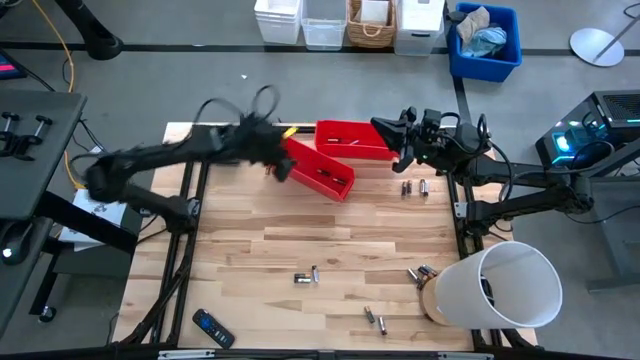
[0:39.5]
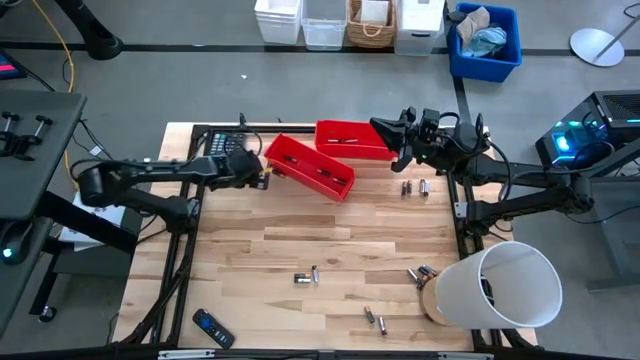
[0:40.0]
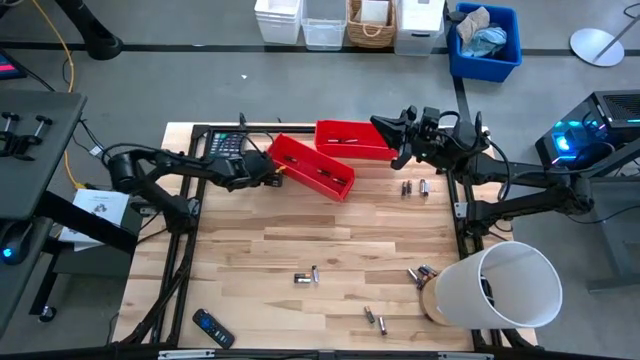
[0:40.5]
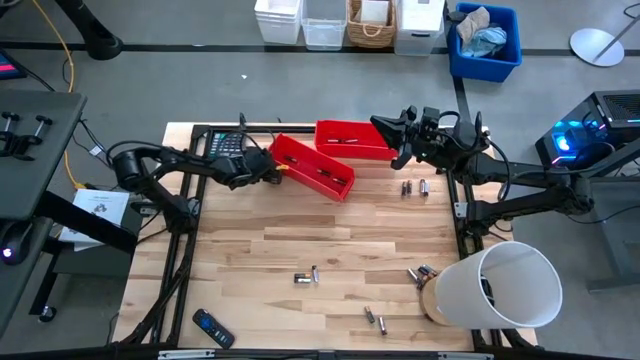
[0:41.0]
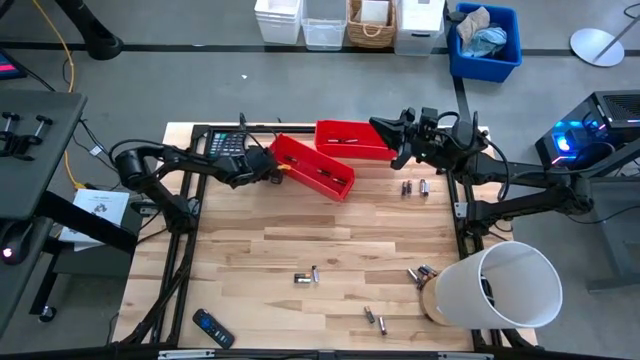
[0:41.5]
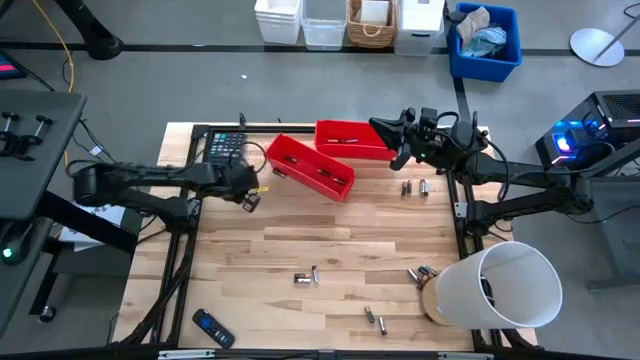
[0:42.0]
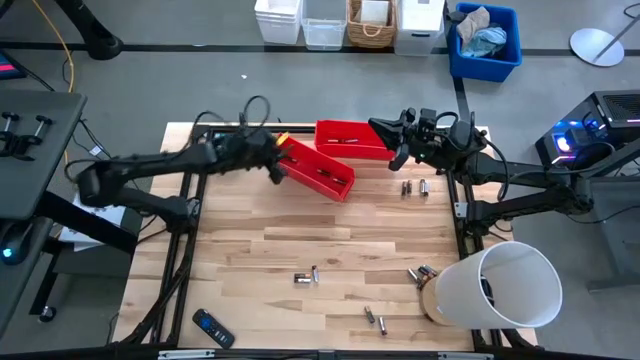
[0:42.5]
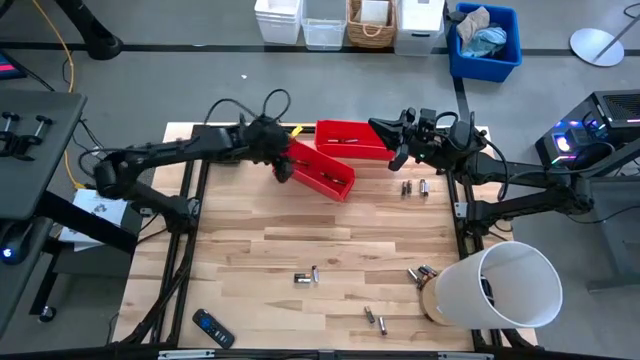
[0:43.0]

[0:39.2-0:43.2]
Task: Sort batteries
Put the black battery into the bottom red bin

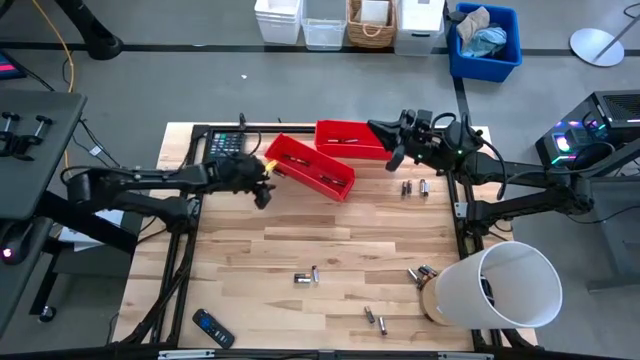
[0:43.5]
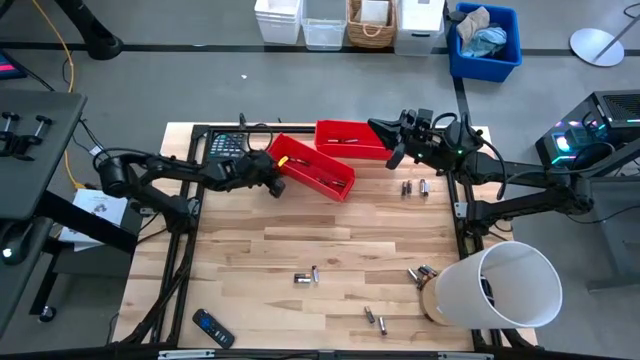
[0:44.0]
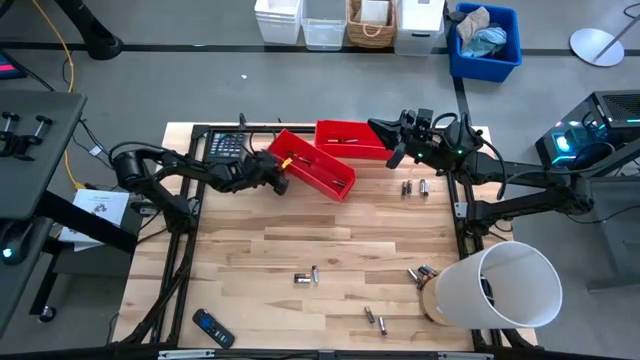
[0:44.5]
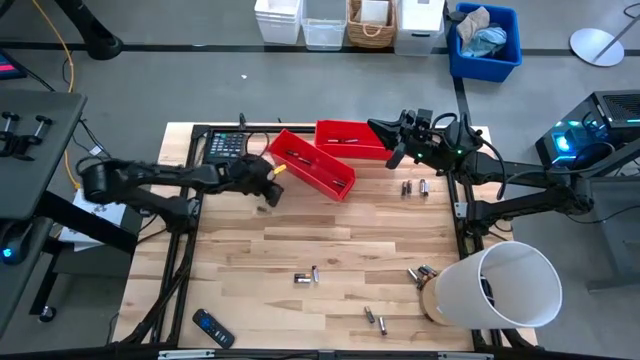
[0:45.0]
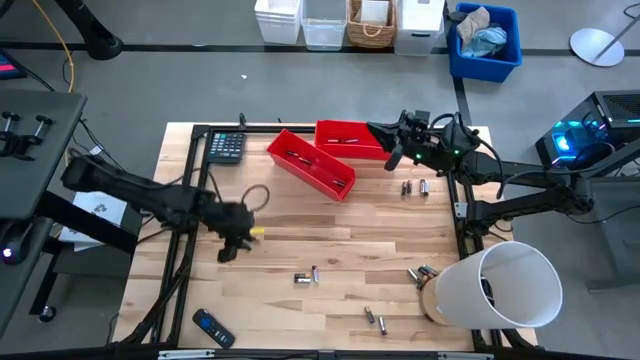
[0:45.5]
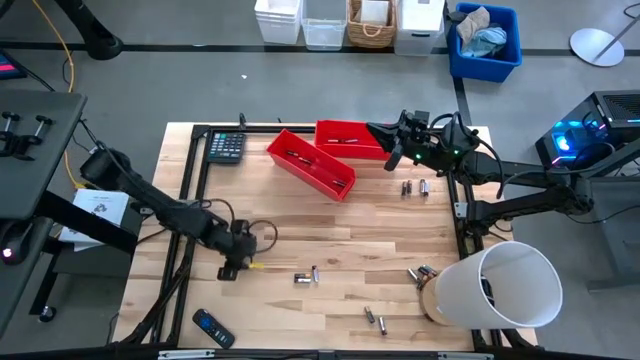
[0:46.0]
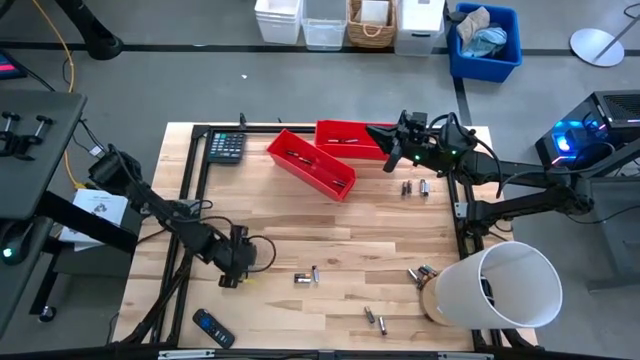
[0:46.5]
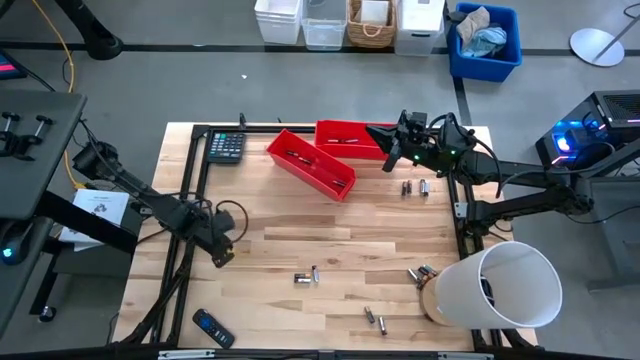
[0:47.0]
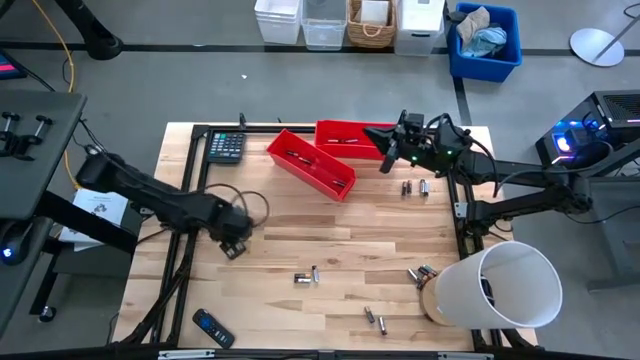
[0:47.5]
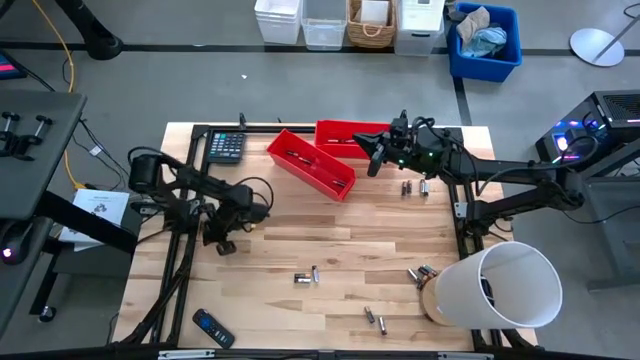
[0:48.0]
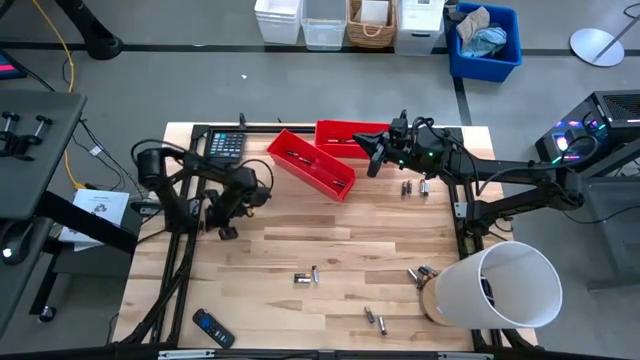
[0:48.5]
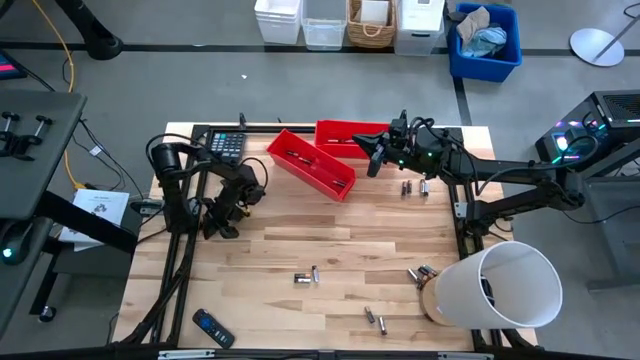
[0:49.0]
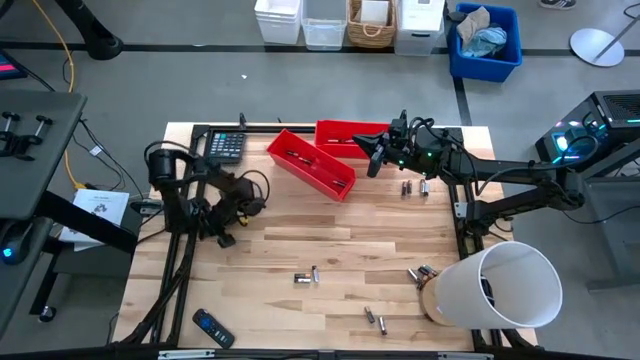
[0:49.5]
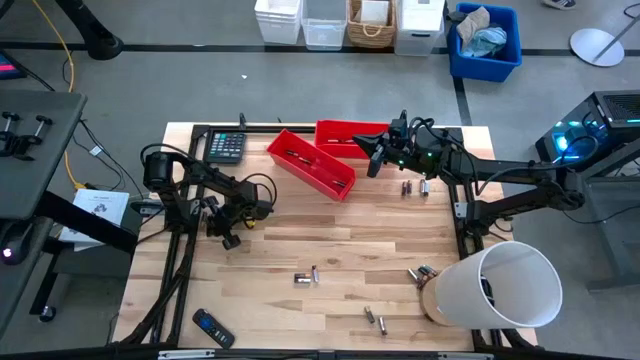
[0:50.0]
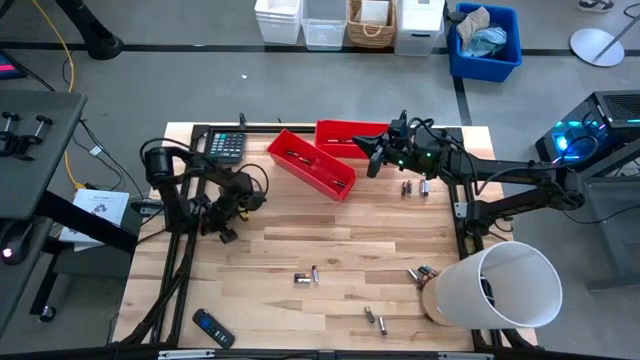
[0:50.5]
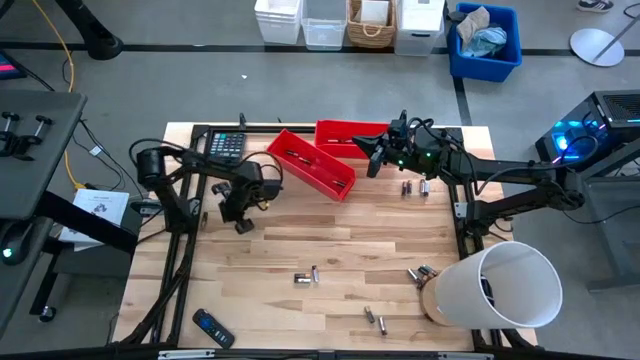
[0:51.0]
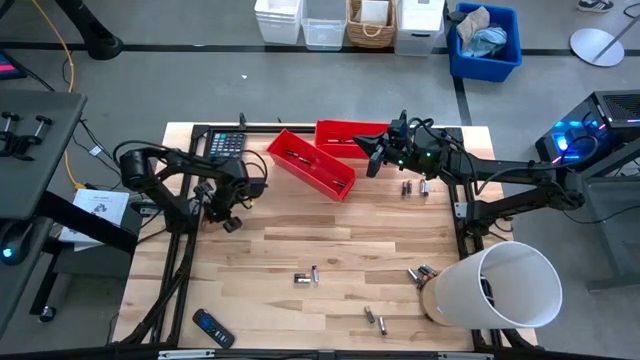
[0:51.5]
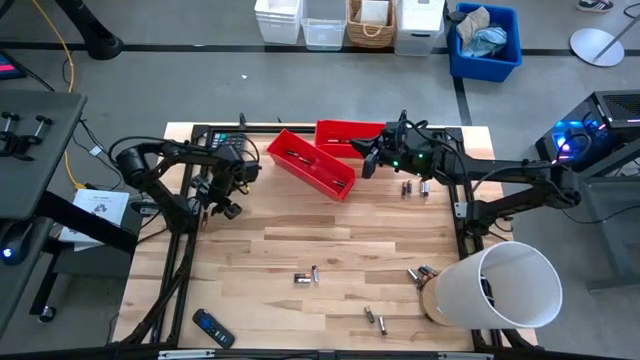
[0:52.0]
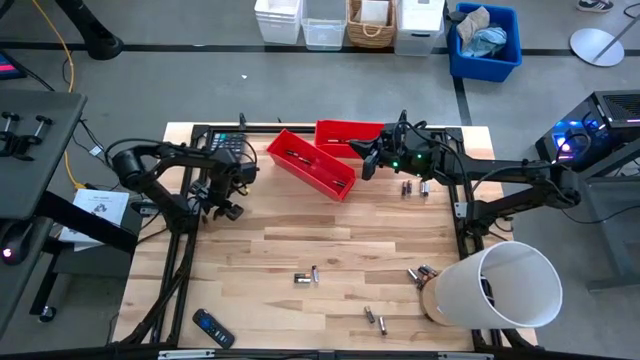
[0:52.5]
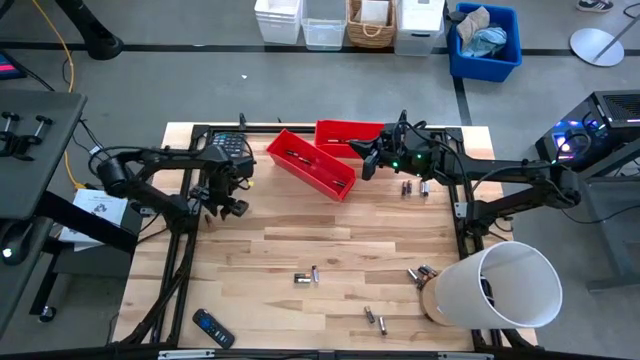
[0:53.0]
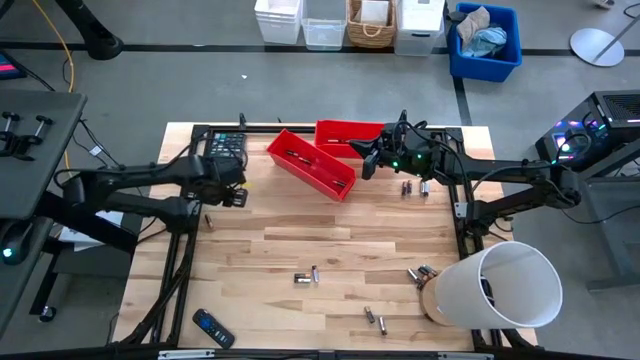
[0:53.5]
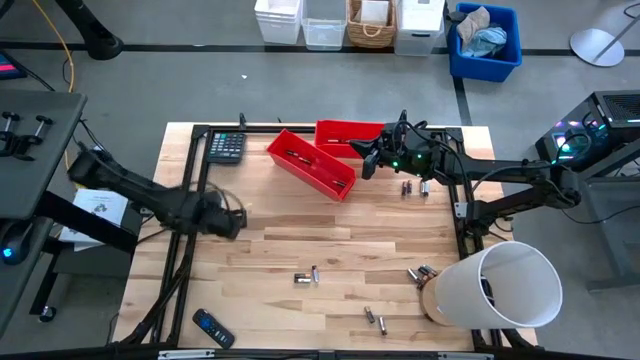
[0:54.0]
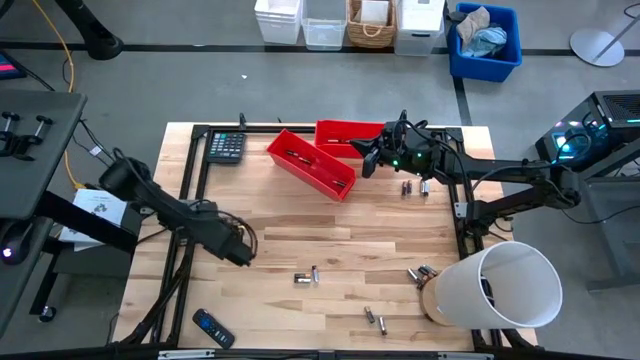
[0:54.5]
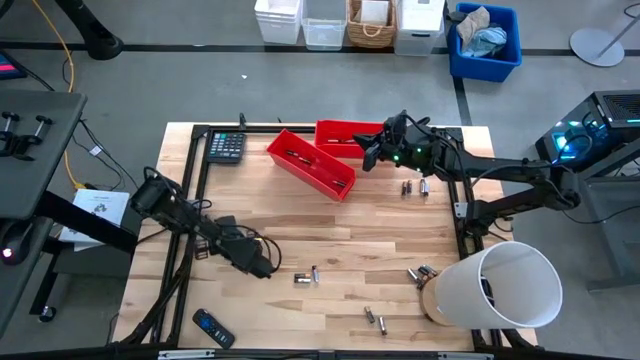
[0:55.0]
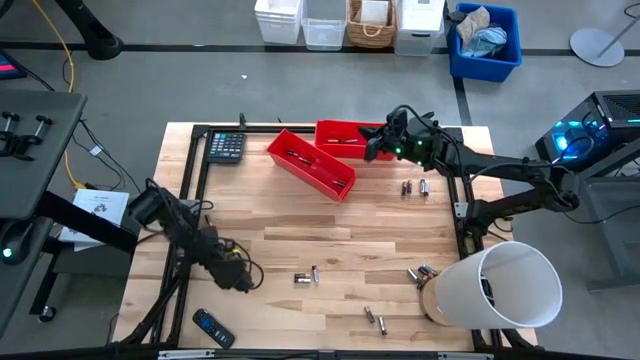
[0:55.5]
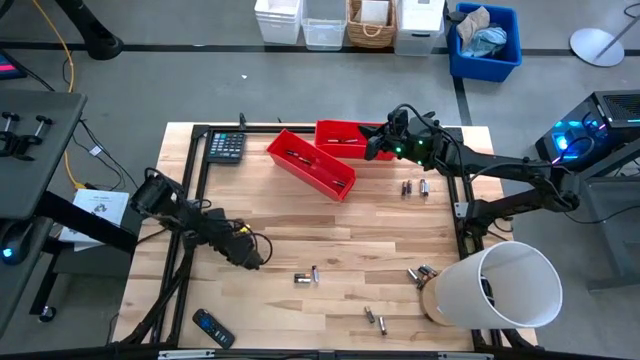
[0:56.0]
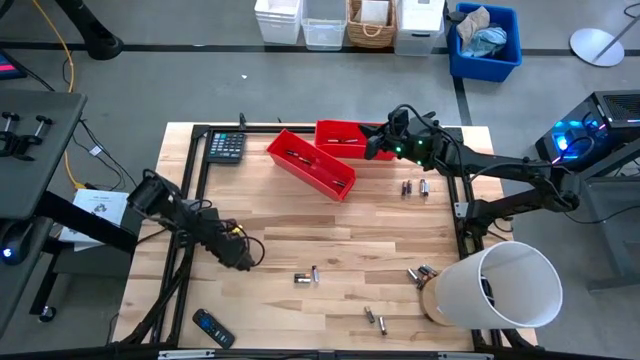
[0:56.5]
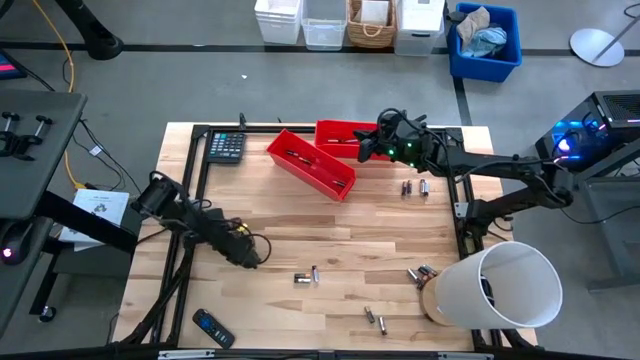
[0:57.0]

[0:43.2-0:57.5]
Put the black battery into the bottom red bin

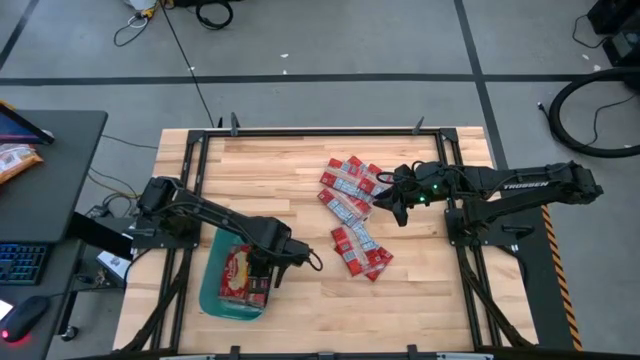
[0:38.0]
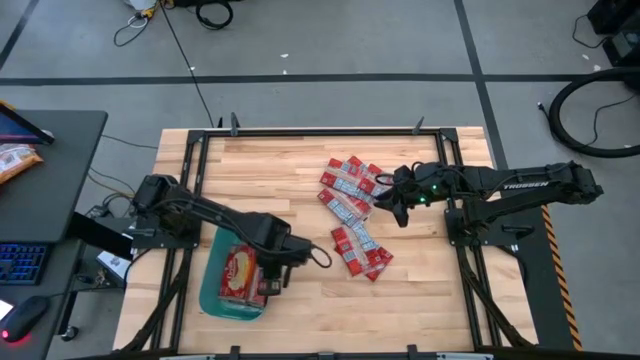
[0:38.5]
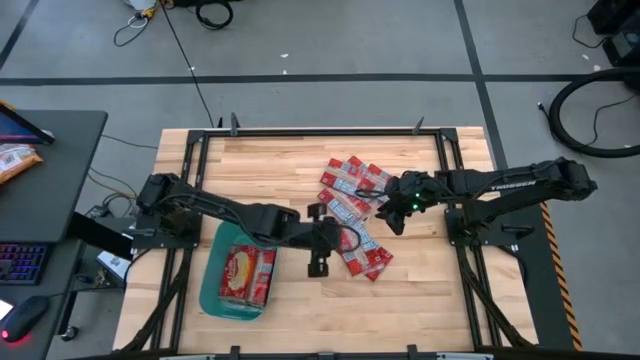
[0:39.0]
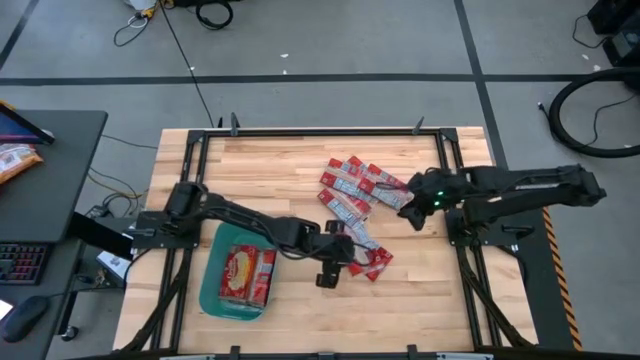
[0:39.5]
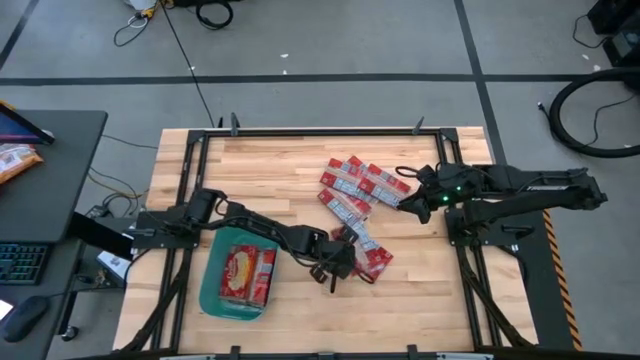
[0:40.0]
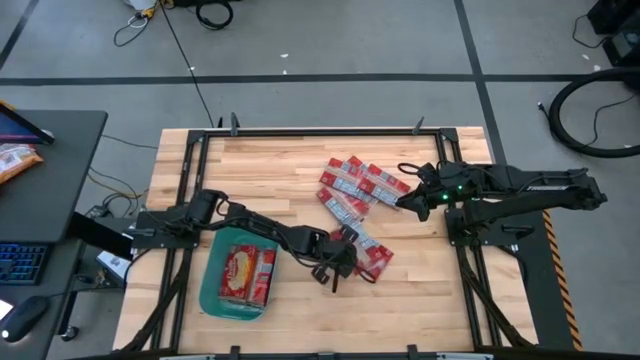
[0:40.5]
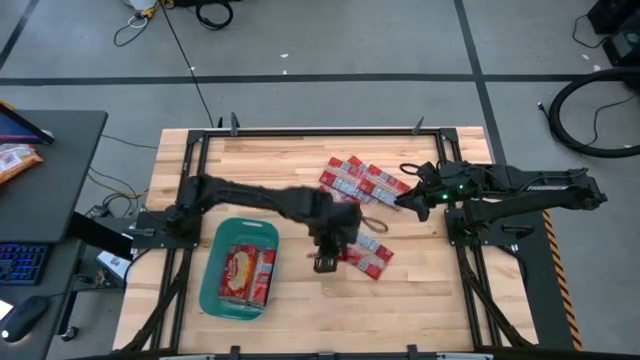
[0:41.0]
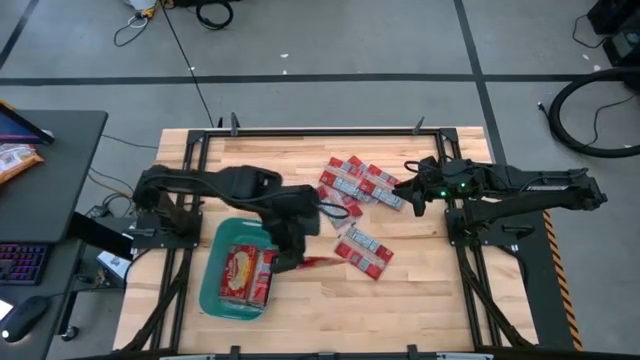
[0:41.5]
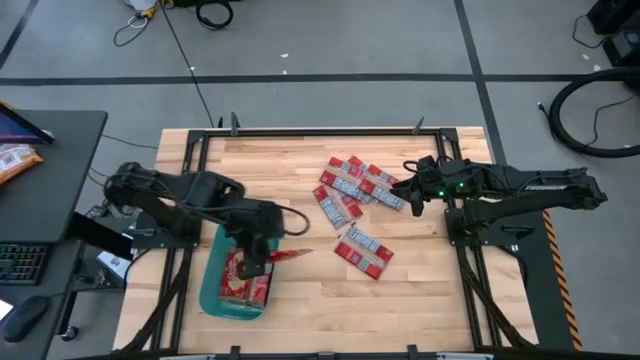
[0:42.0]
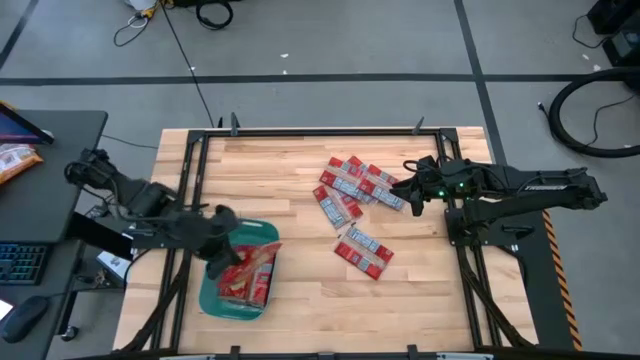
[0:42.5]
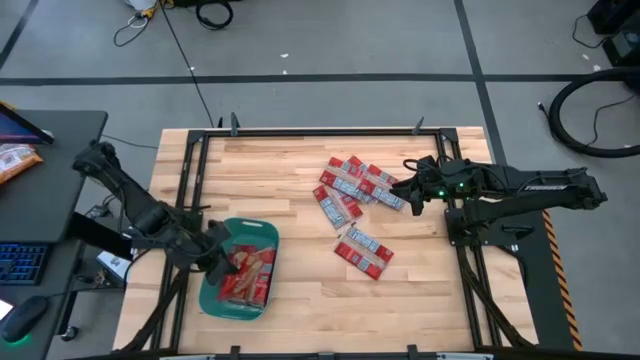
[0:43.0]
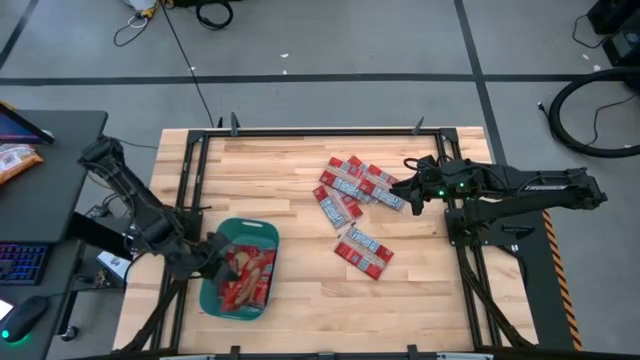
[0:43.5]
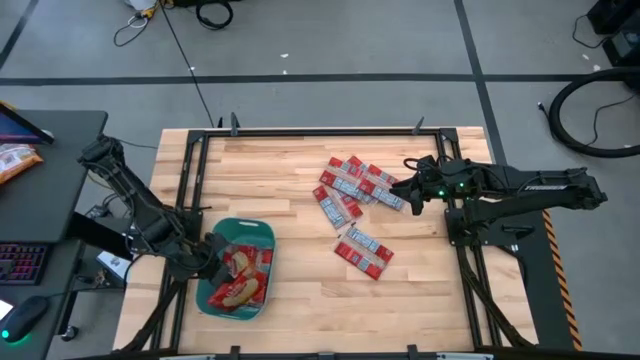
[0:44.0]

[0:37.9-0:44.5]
Task: Sort popcorn bags into baskets
Put the red popcorn bag into the green bin
